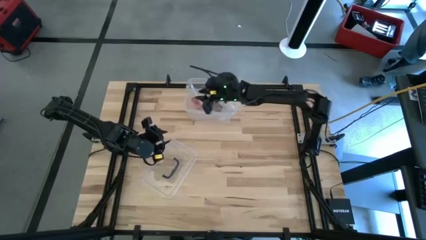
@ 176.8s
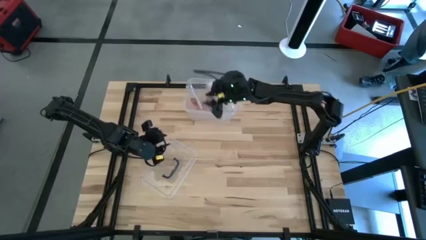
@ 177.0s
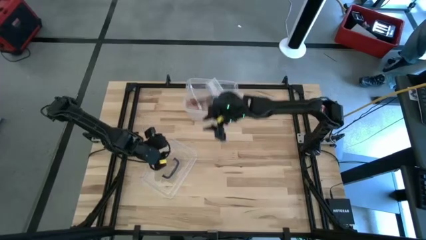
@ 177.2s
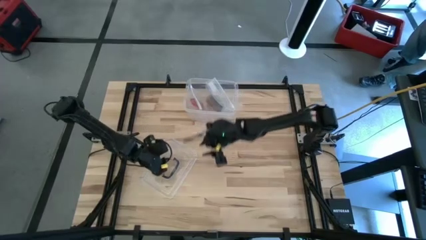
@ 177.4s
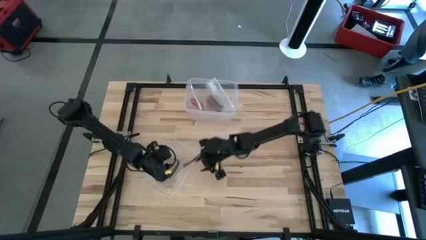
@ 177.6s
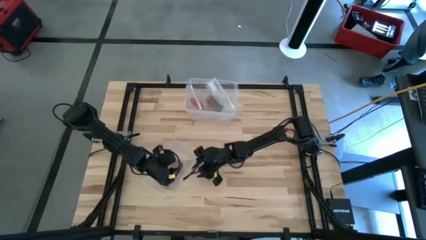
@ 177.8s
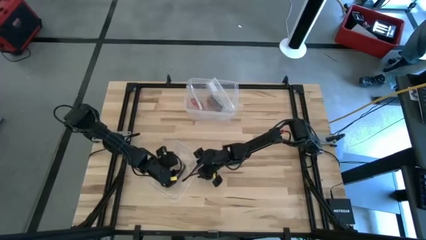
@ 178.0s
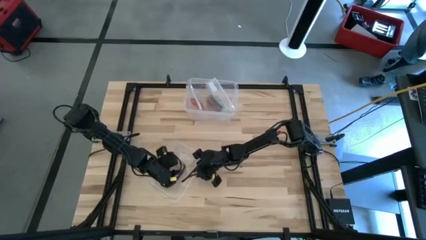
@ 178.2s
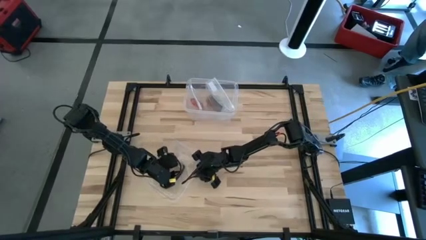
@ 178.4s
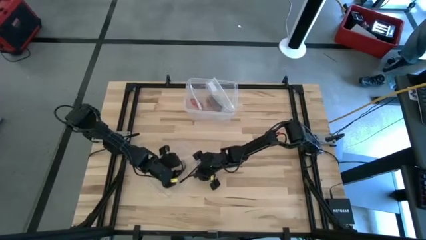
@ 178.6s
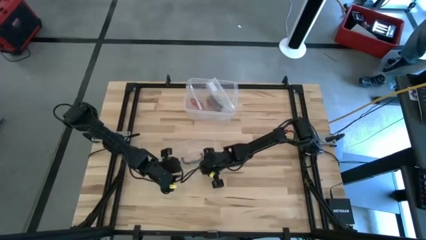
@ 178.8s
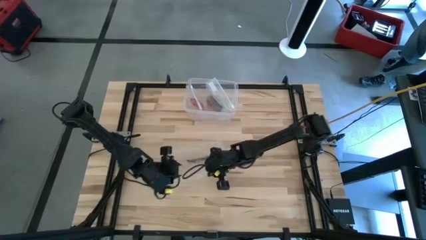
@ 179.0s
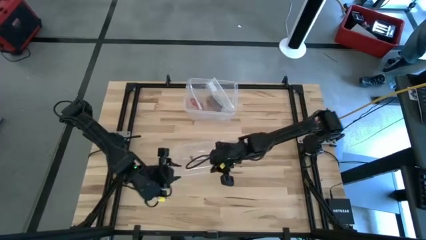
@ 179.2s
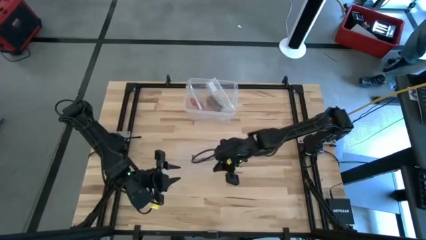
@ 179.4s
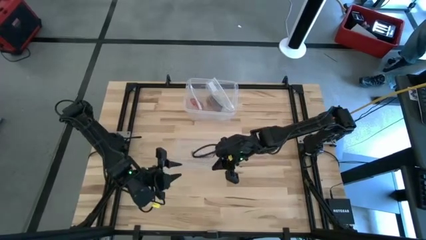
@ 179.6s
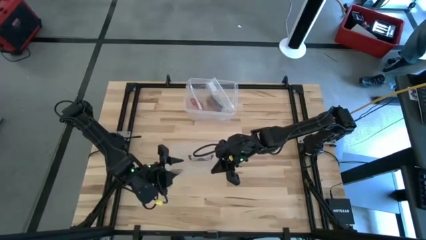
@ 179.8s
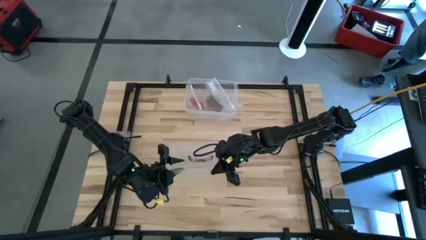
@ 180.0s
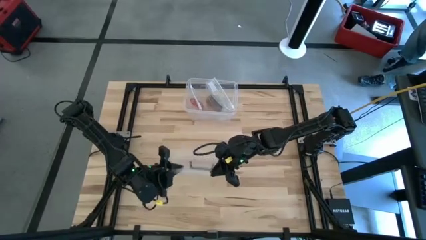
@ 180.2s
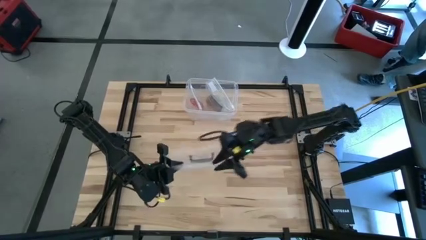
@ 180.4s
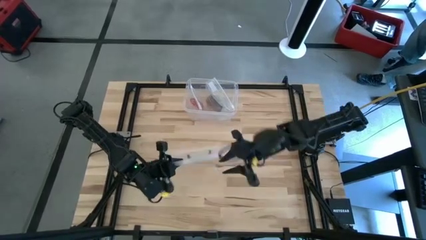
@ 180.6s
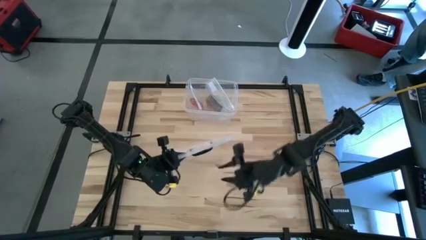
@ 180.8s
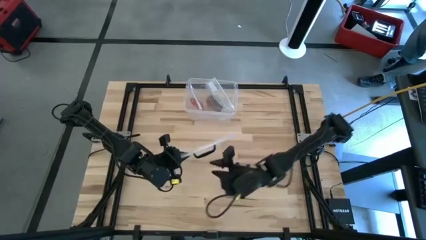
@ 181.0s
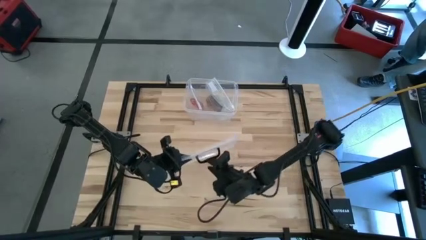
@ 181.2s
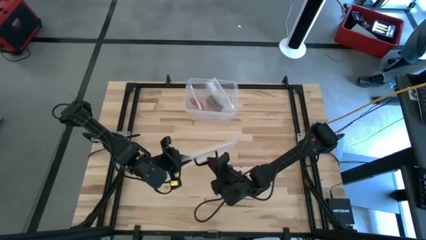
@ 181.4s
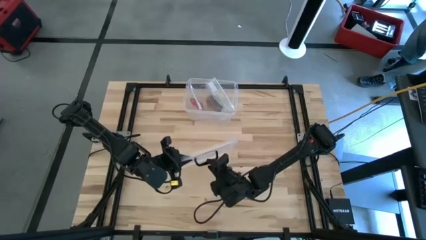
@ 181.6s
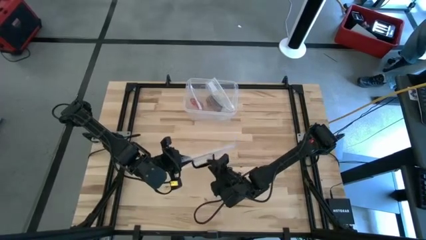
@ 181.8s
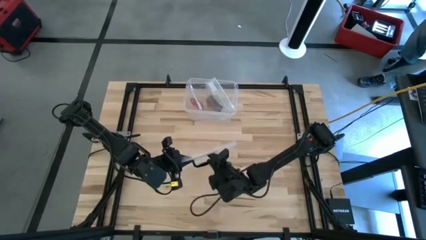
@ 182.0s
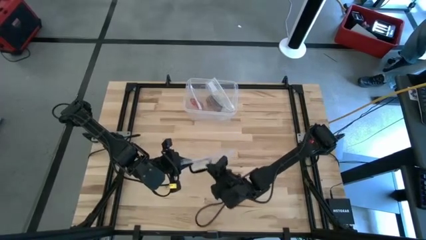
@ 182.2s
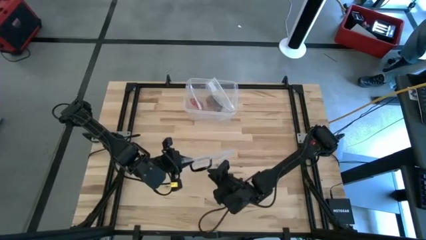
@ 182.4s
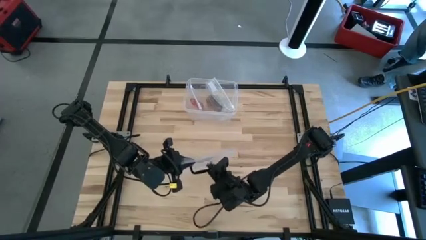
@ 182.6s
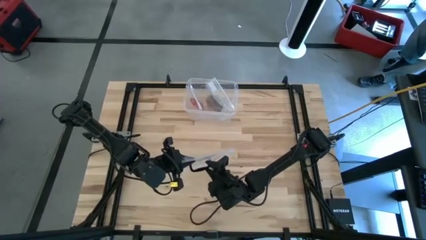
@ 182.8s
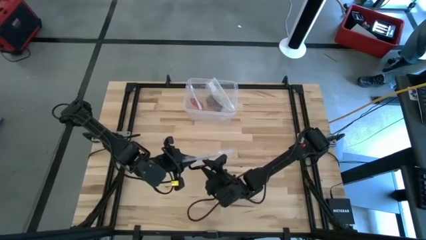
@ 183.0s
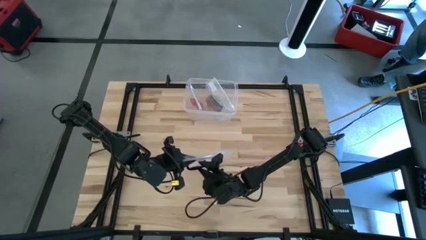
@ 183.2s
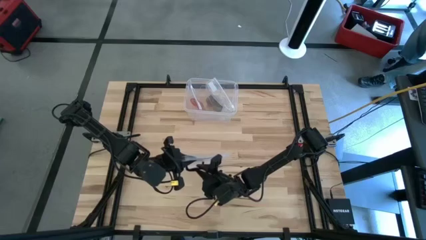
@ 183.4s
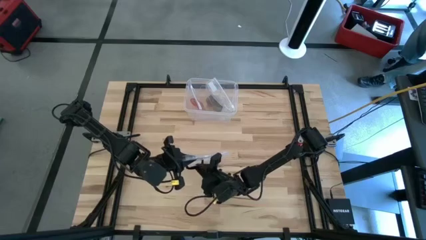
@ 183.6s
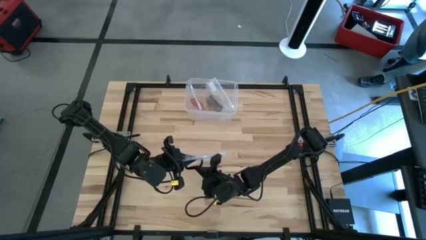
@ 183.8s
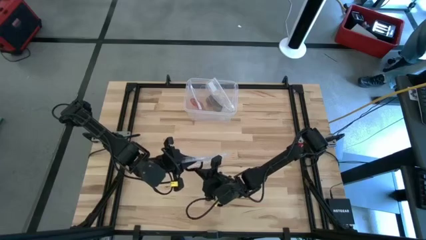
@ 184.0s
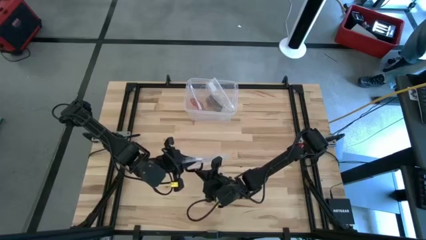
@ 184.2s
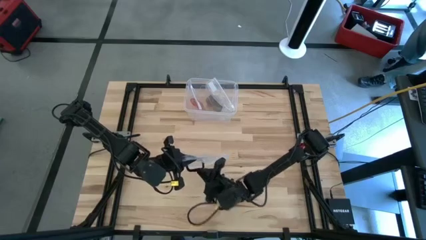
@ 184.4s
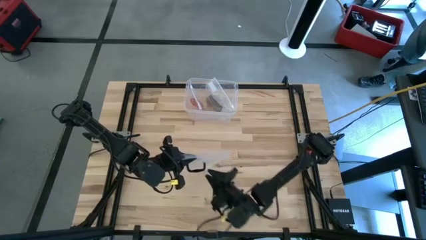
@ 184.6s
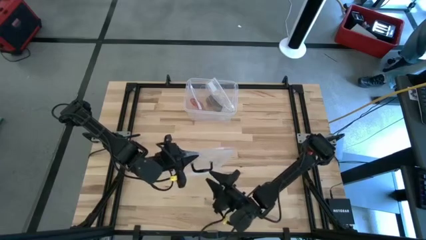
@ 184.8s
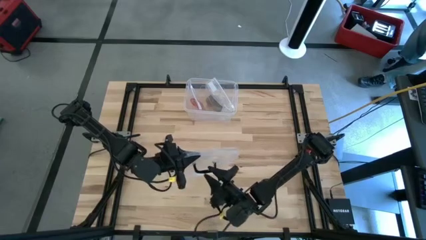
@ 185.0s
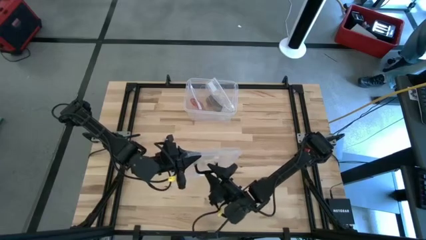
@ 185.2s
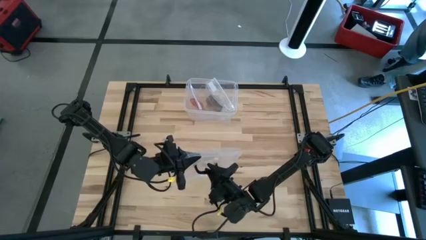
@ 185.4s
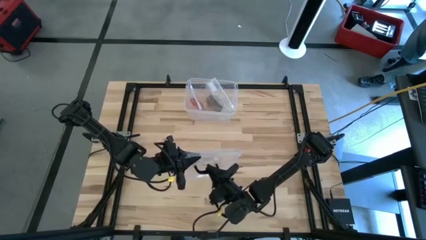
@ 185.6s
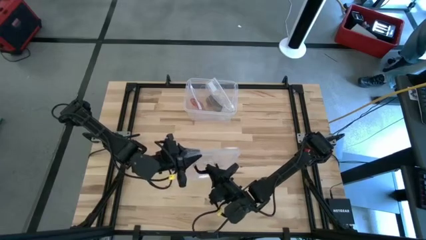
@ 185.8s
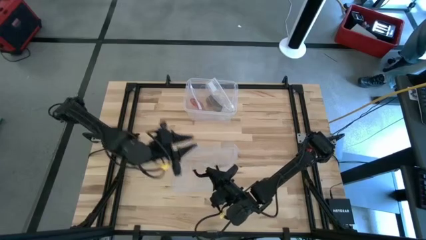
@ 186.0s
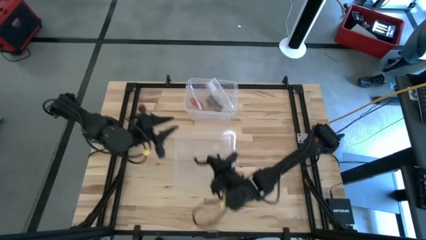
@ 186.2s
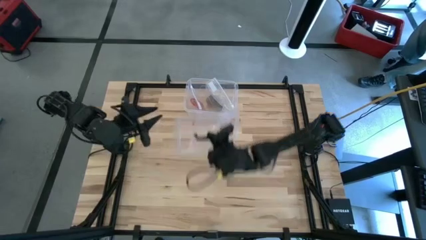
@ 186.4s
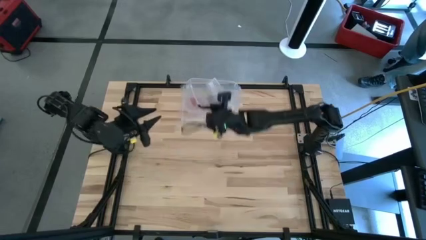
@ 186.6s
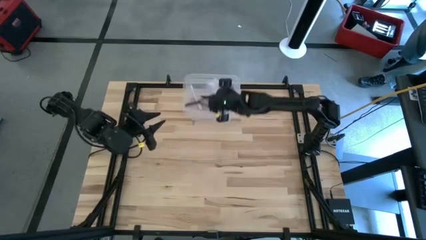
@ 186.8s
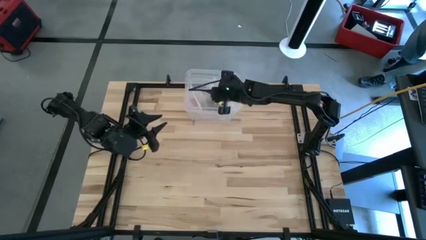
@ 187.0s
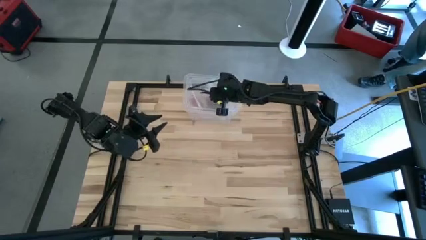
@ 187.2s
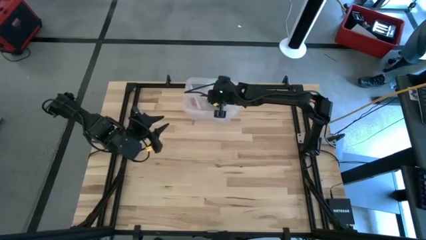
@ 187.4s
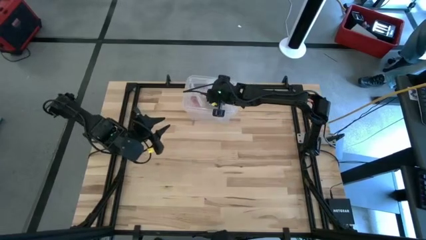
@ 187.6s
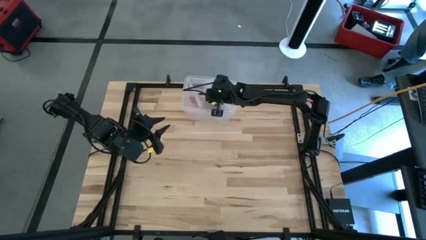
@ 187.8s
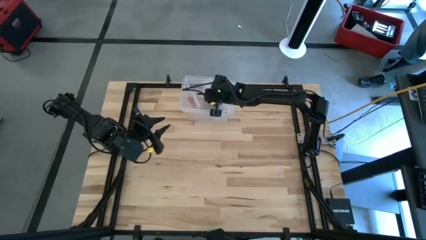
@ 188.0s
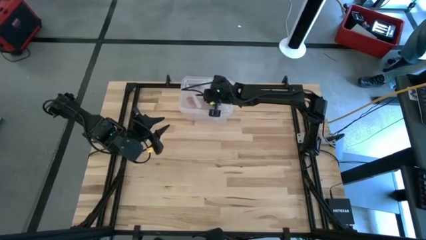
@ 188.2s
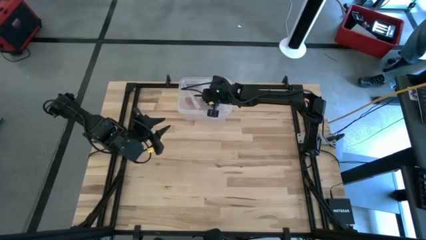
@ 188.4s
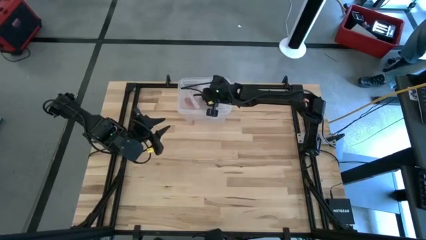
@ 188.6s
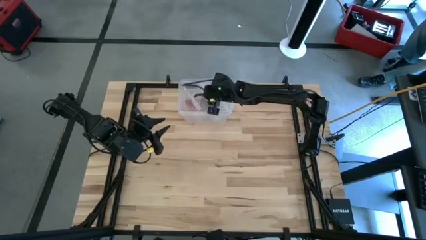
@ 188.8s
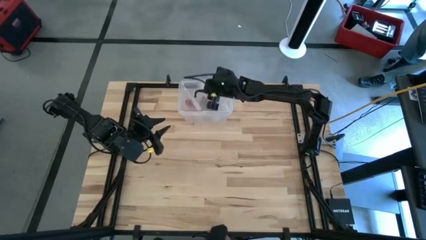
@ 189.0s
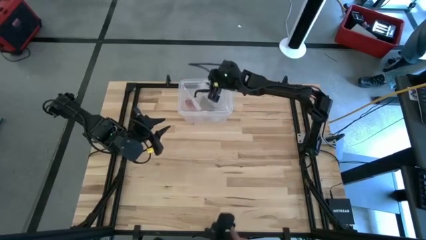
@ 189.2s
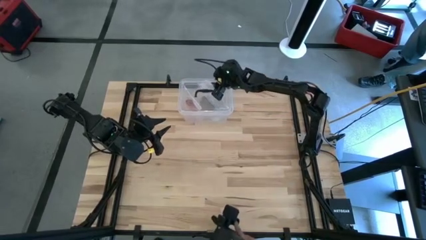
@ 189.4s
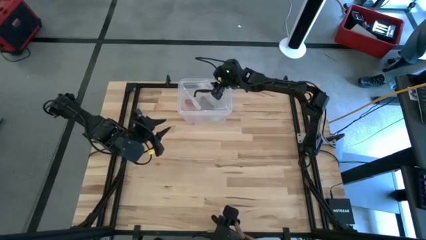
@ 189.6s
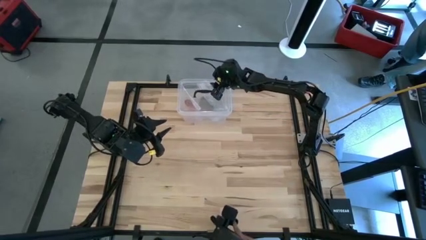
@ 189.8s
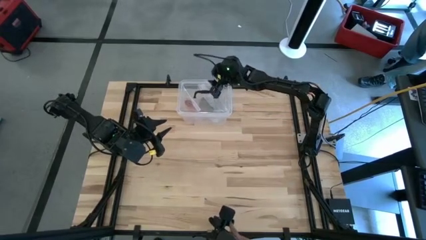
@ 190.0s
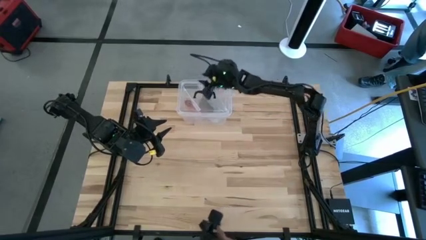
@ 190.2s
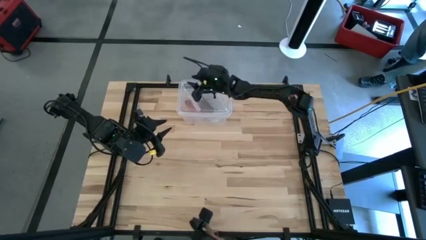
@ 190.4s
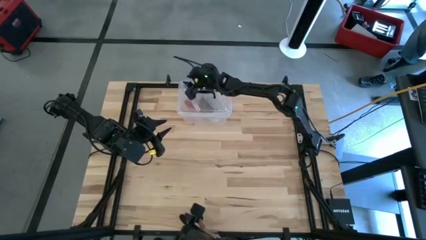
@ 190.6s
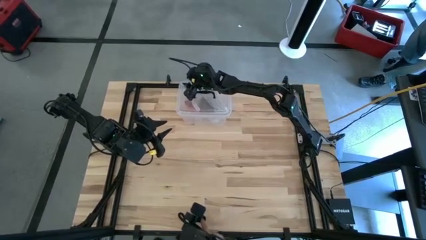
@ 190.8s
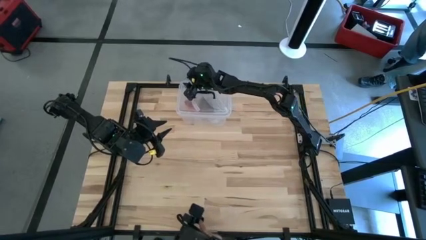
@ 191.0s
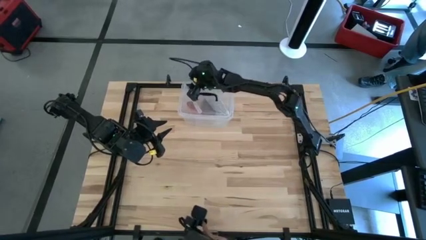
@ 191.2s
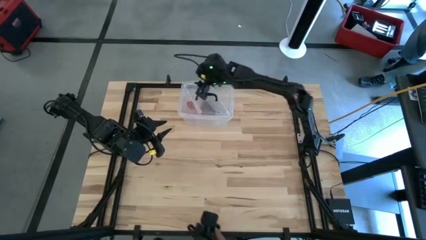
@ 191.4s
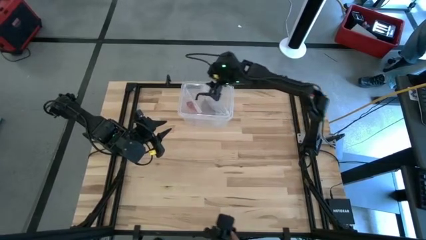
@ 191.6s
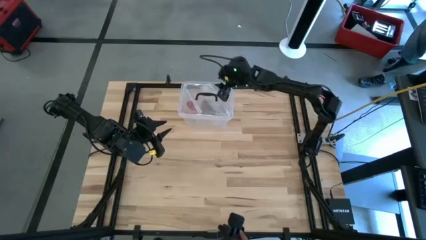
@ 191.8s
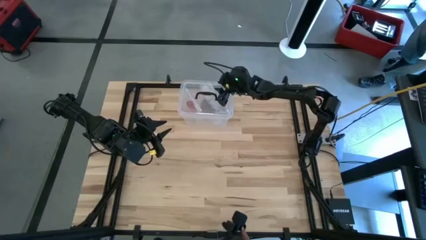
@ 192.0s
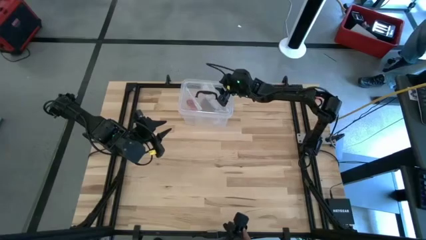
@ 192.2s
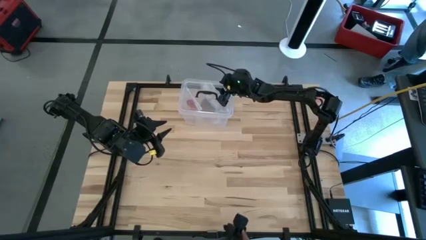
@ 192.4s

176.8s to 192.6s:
Task: Roll bandage
Close the container

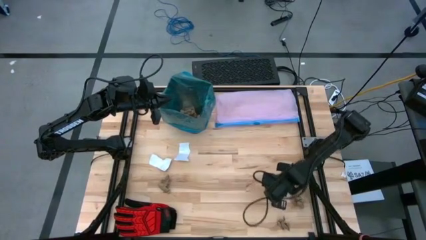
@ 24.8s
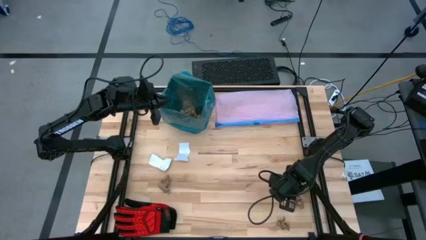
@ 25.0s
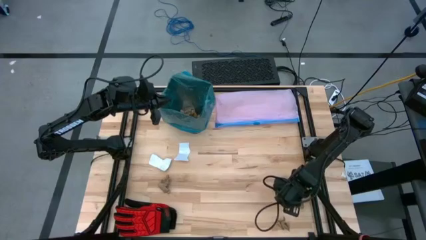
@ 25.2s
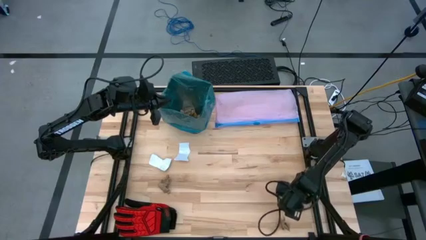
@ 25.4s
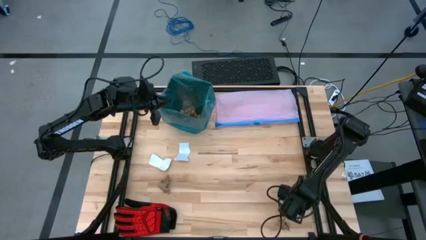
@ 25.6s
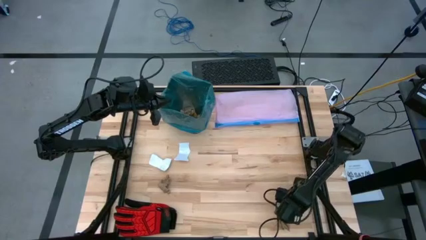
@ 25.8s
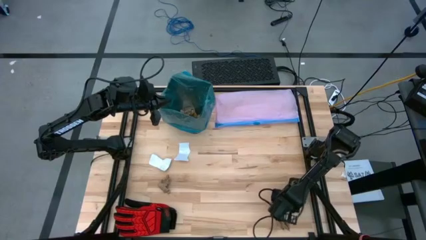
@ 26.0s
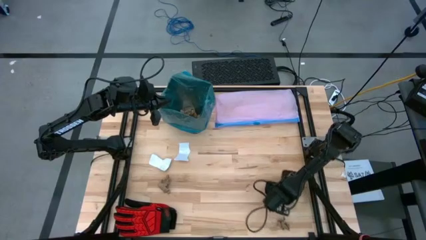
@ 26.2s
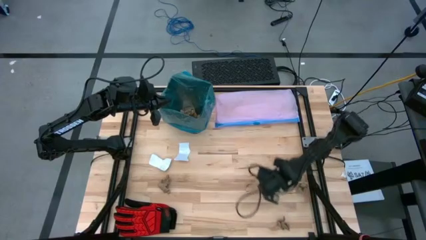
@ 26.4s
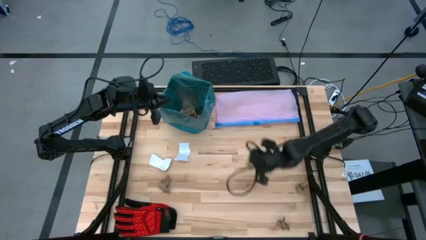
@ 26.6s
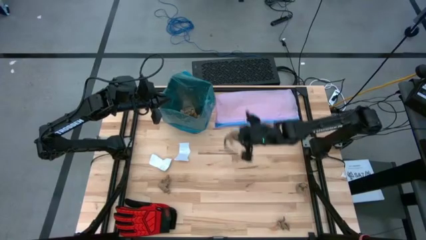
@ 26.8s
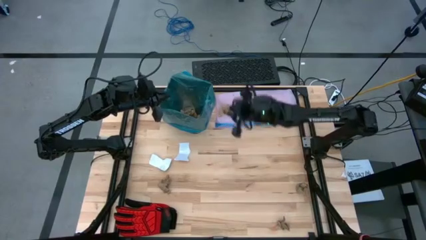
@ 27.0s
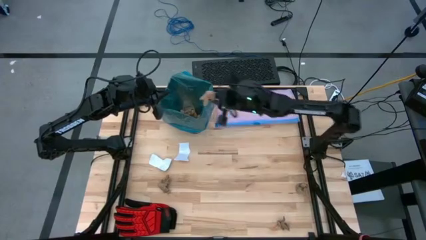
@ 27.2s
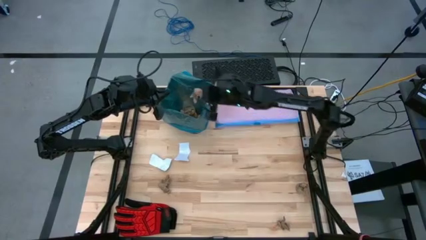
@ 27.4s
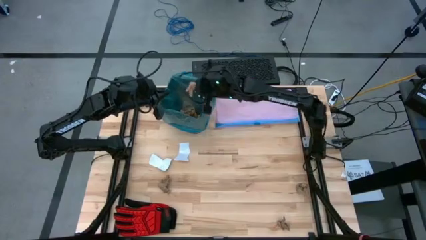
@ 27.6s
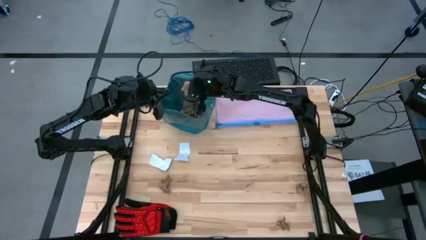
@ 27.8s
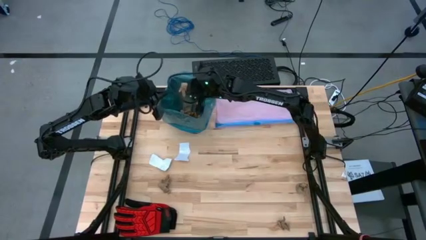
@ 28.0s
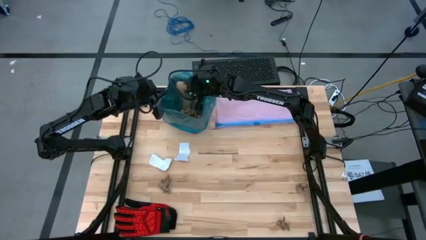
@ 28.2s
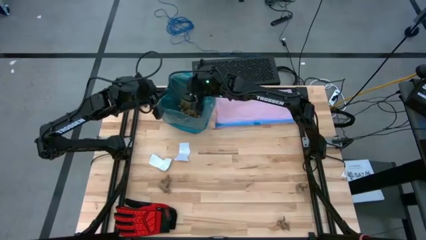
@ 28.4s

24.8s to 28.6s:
Task: place trash/remove bag and relplace
Put the brown napkin into the trash bin
